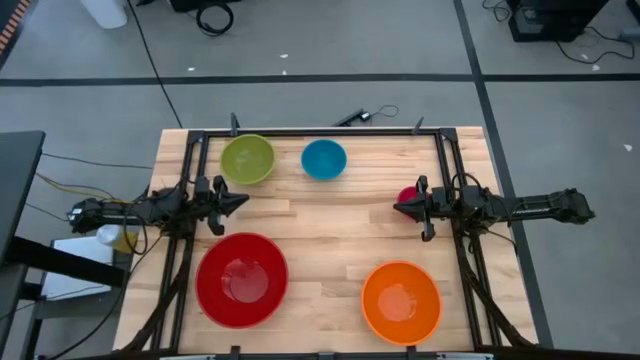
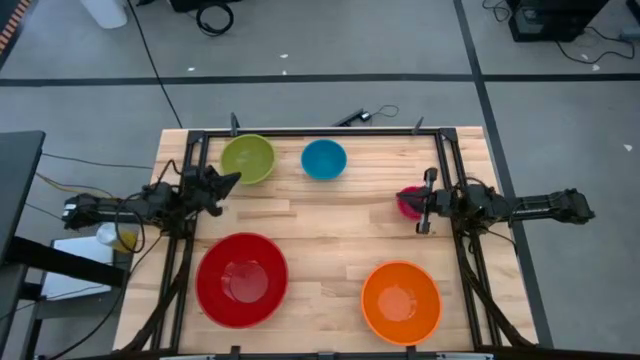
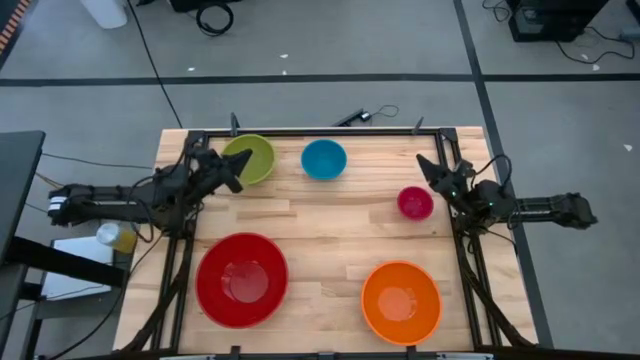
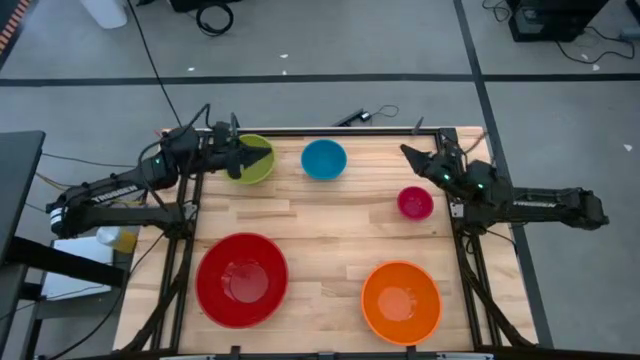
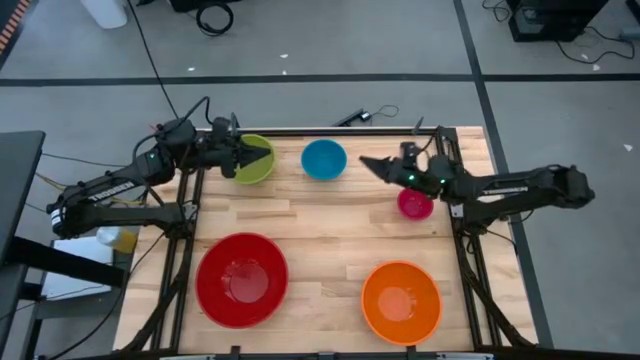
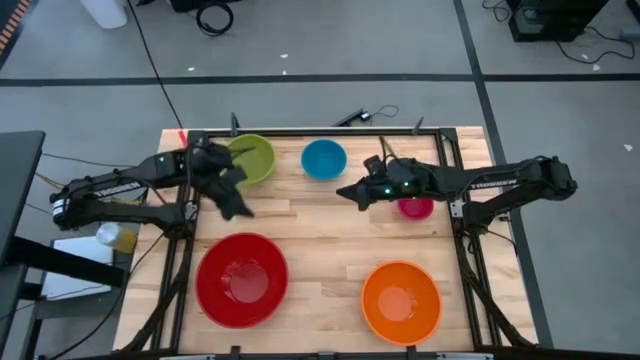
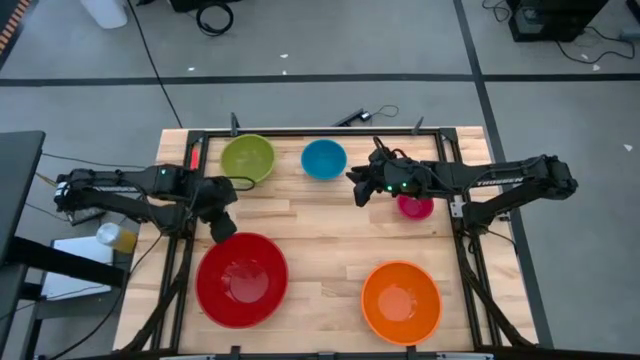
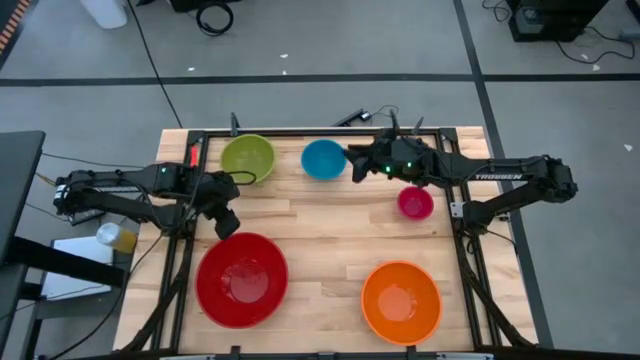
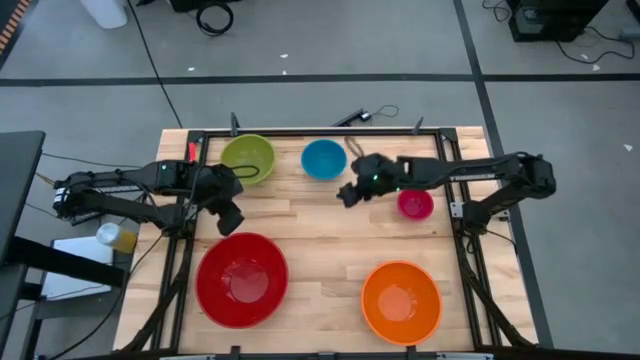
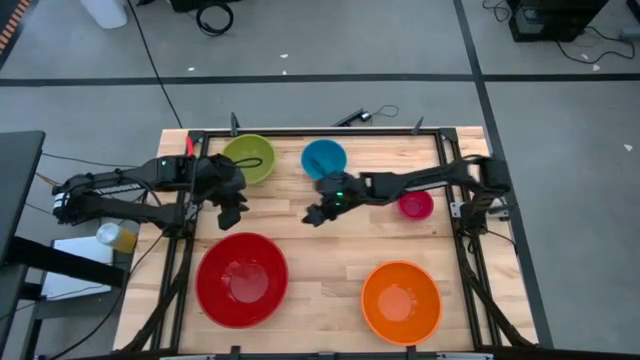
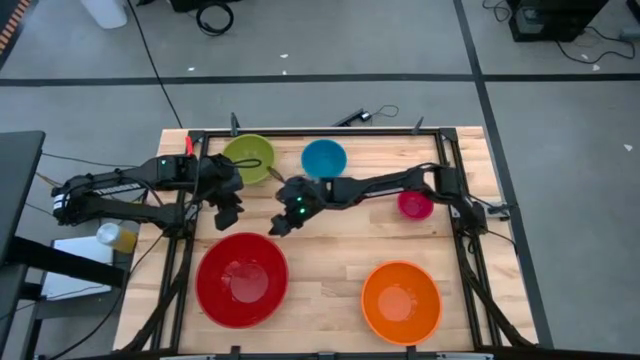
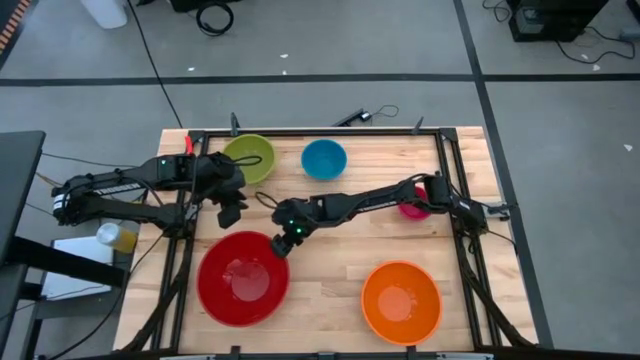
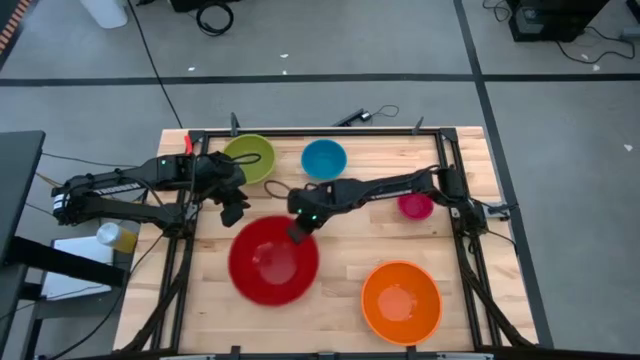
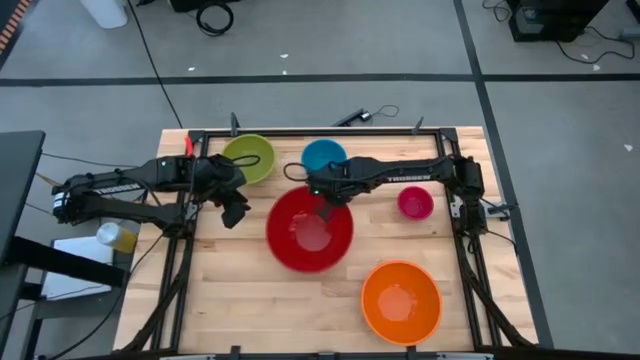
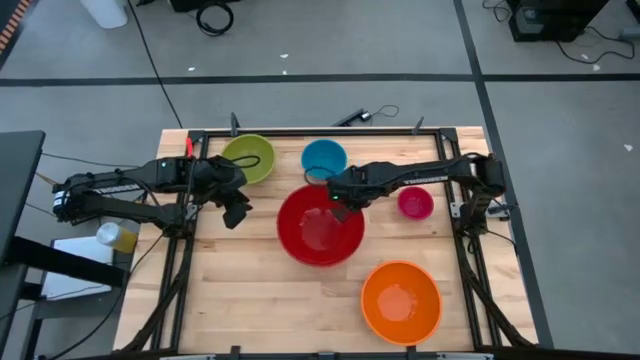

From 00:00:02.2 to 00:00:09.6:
Move the red bowl to the center of the table

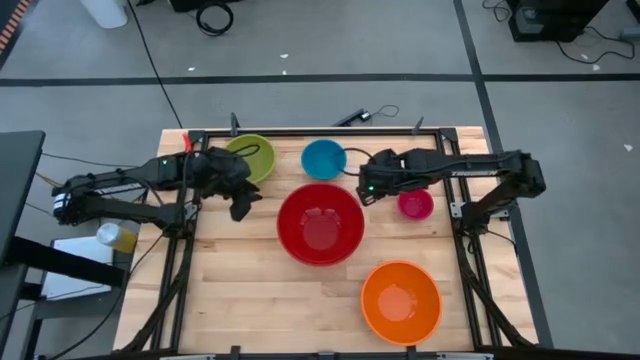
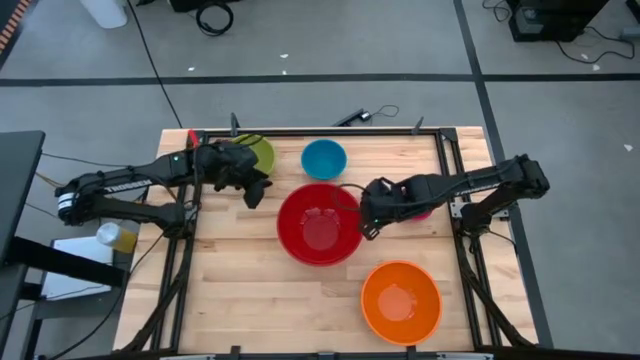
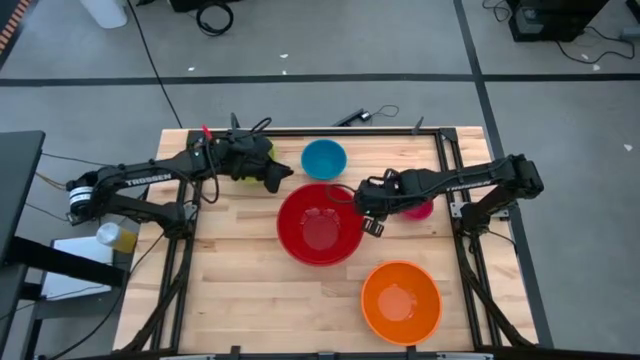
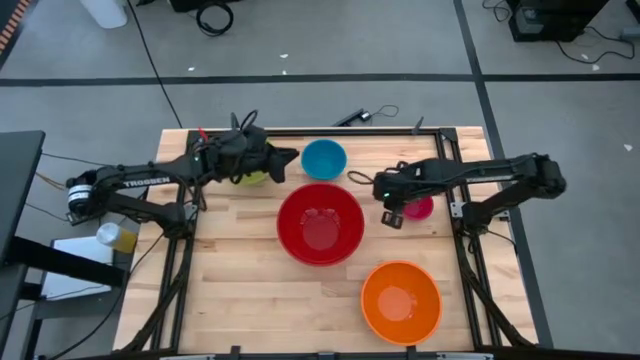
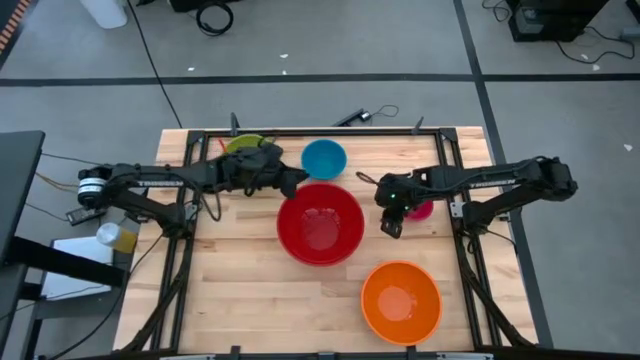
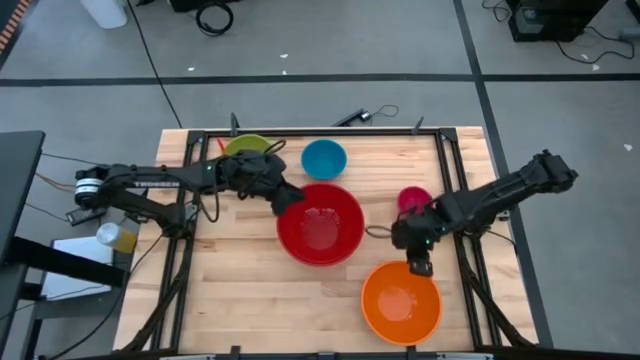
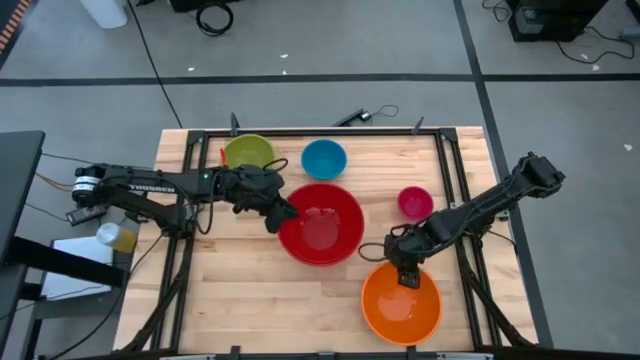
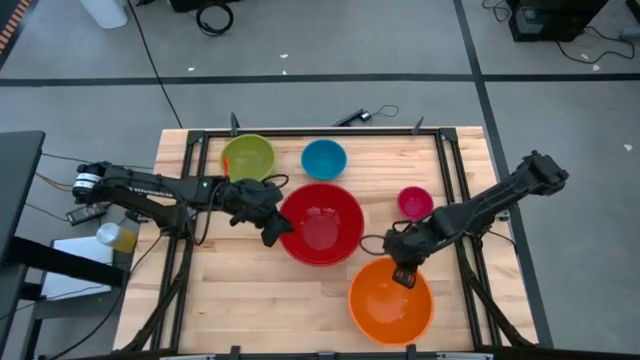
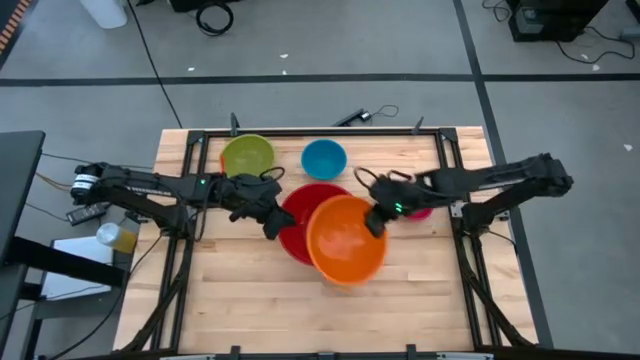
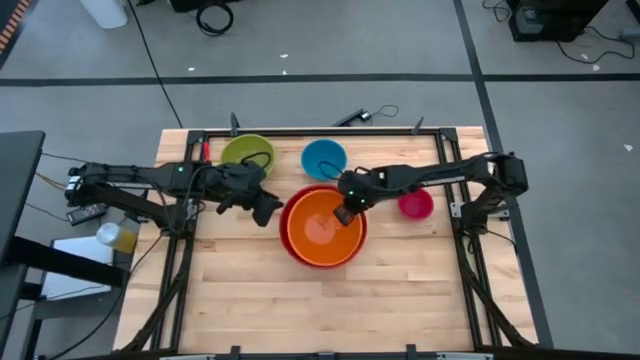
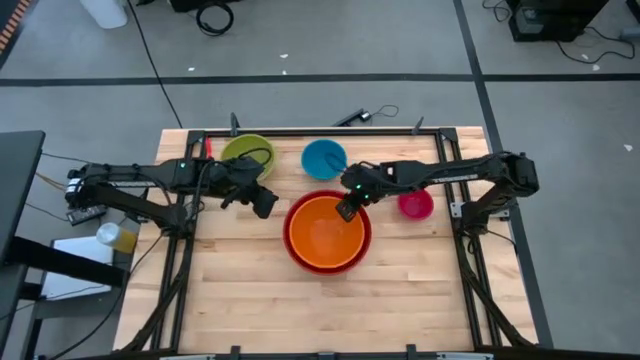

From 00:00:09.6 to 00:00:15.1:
Stack the orange bowl on top of the red bowl

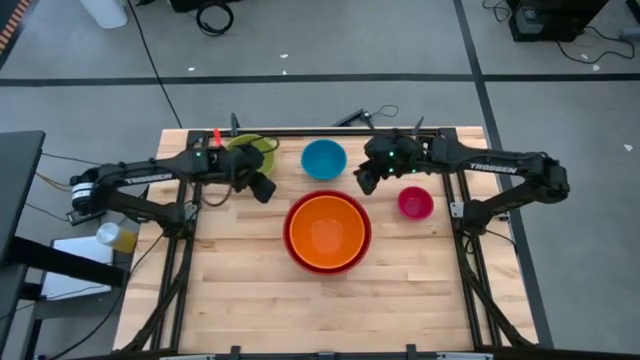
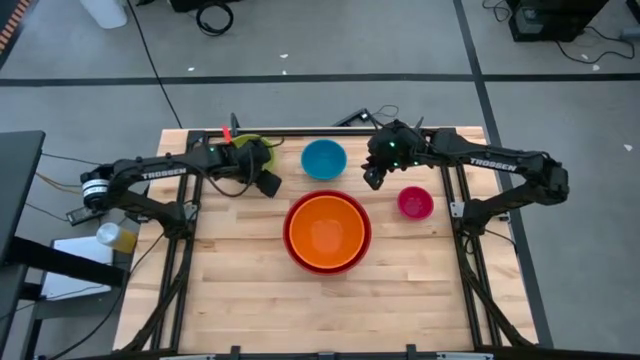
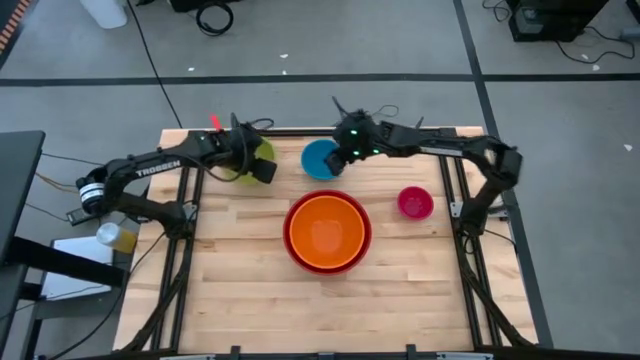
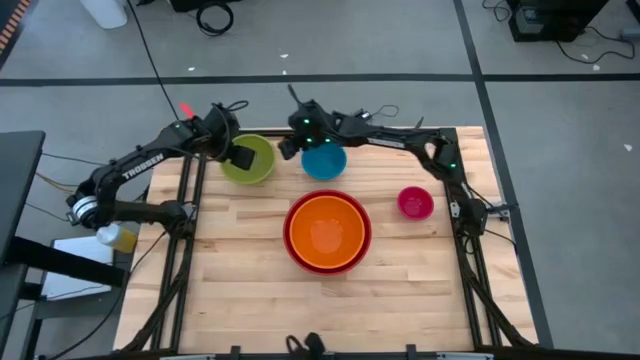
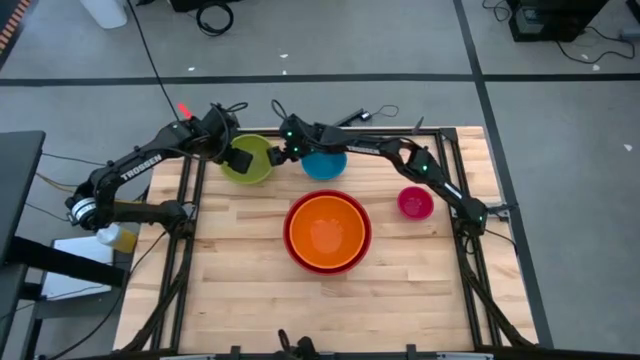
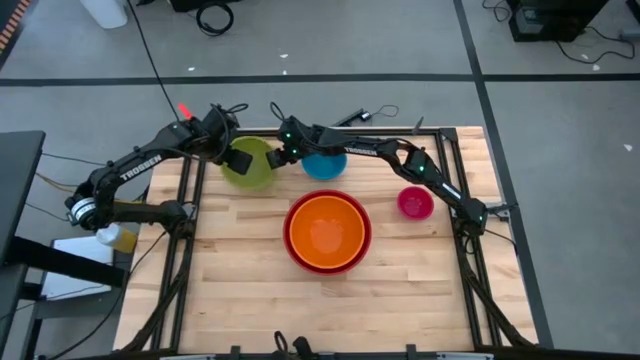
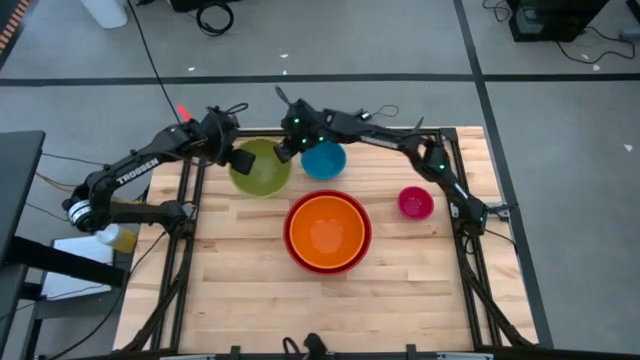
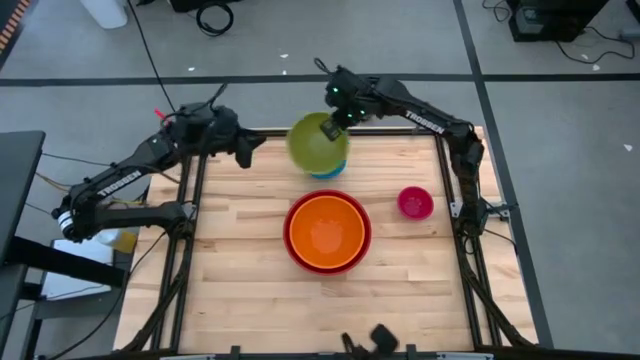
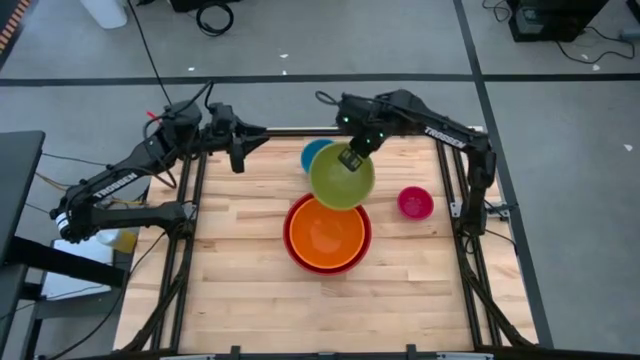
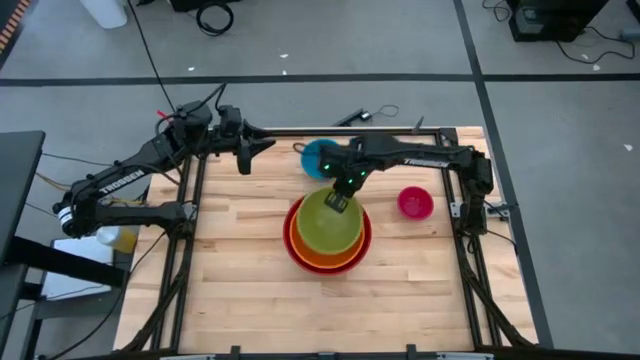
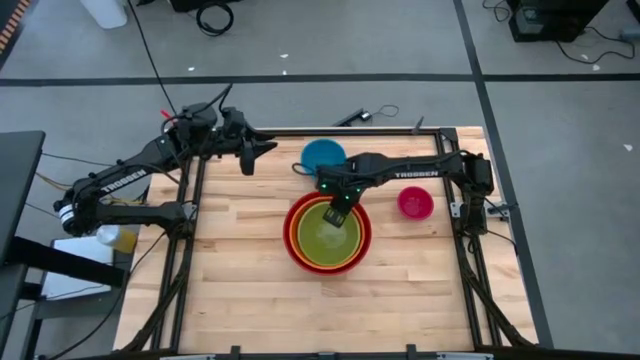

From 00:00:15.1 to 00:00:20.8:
Stack the green bowl on top of the orange bowl

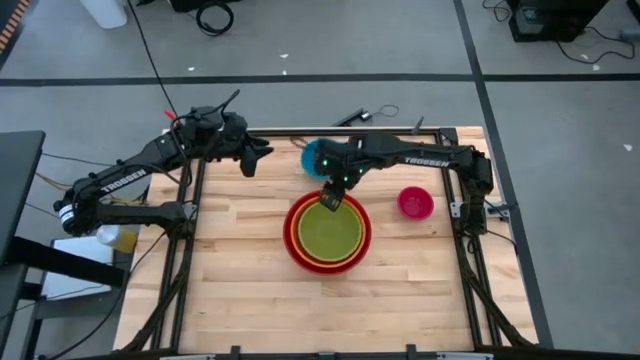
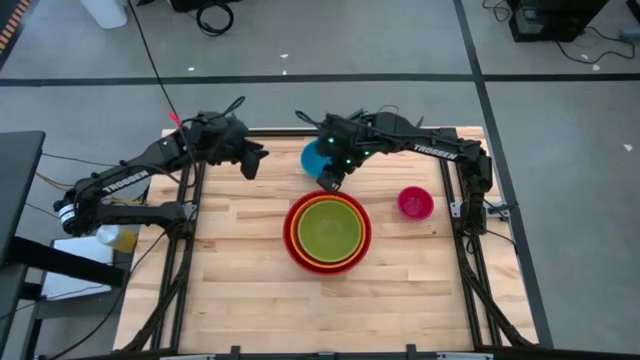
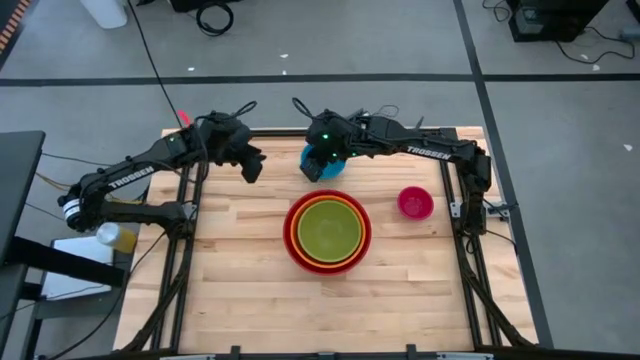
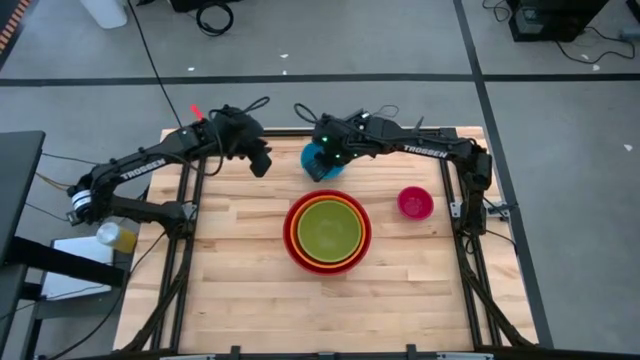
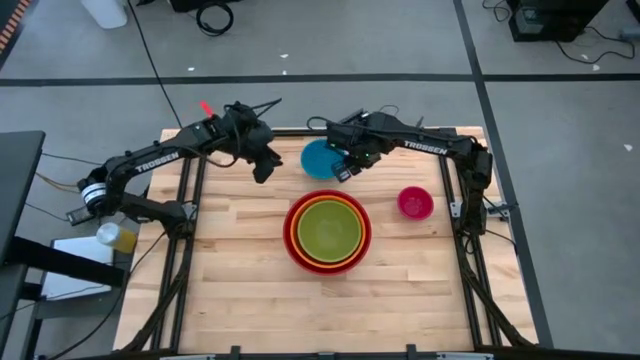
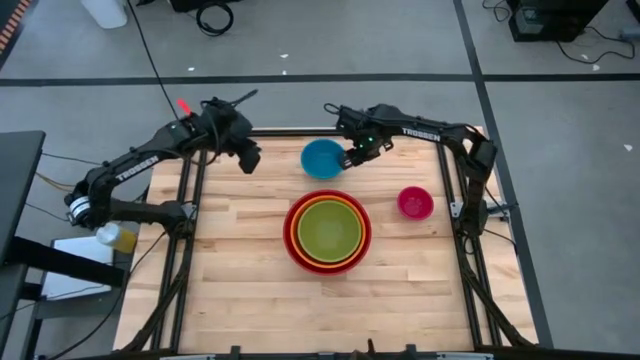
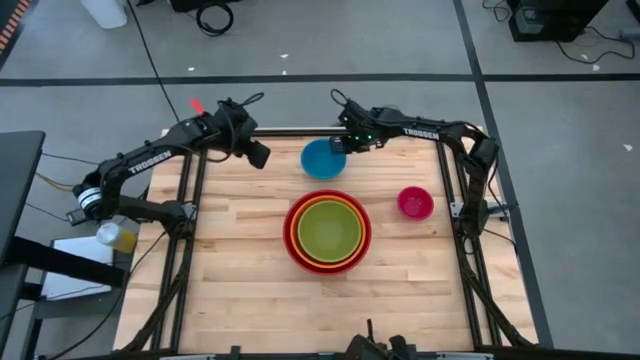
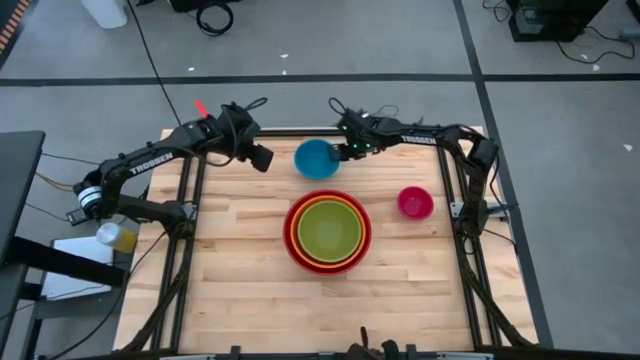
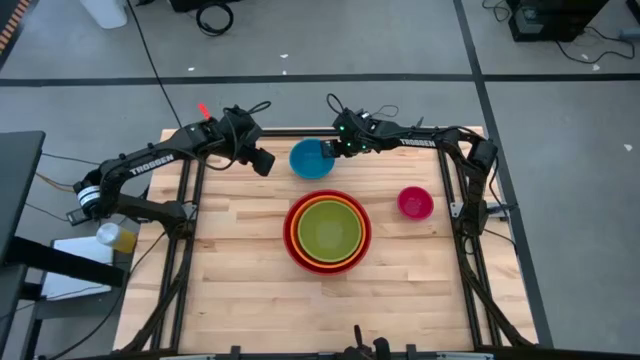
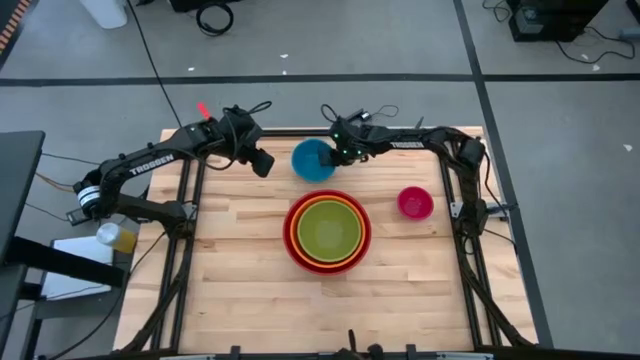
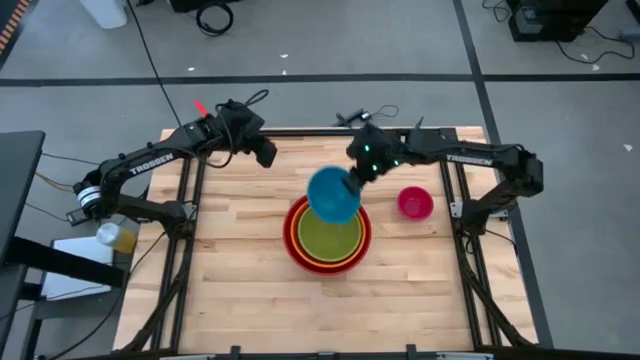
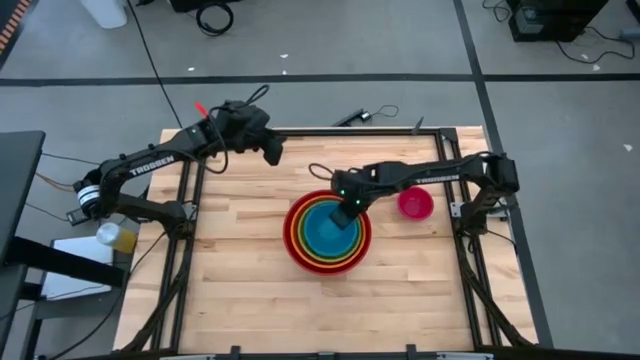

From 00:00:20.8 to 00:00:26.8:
Stack the blue bowl on top of the green bowl
